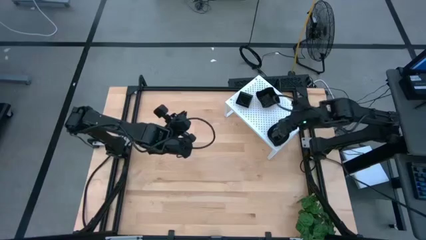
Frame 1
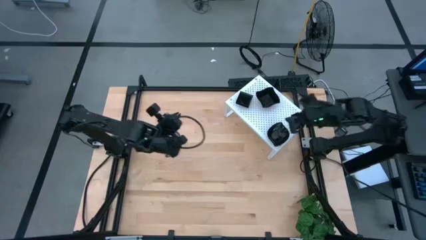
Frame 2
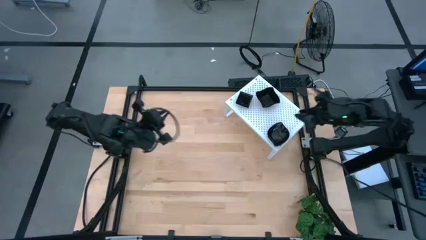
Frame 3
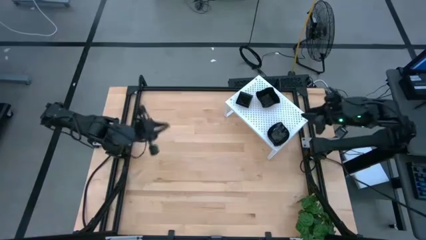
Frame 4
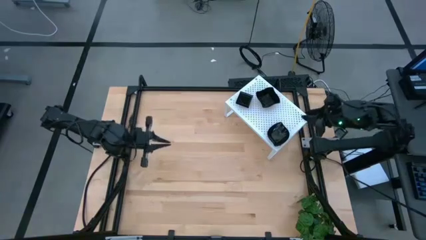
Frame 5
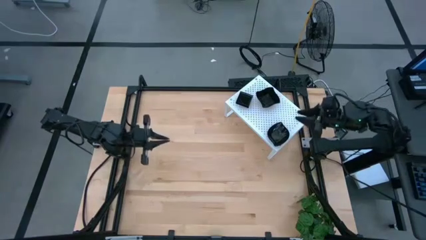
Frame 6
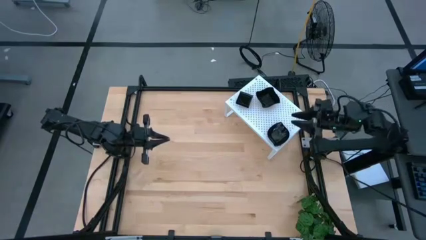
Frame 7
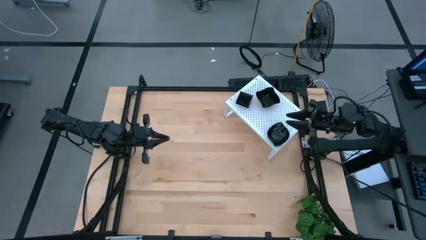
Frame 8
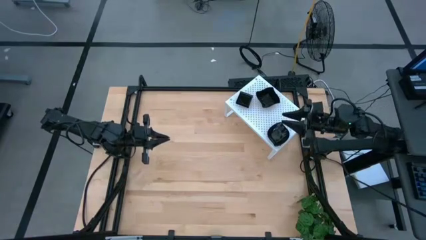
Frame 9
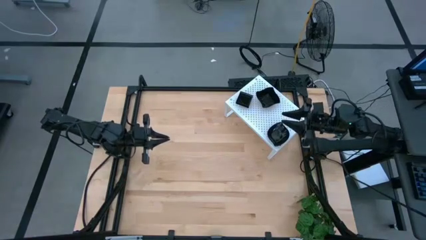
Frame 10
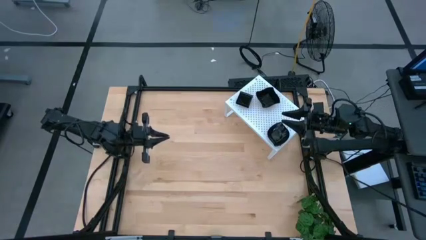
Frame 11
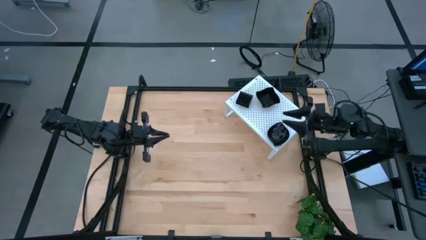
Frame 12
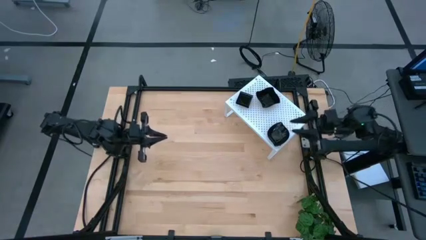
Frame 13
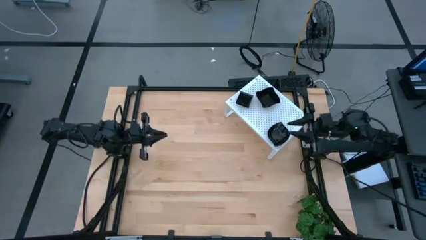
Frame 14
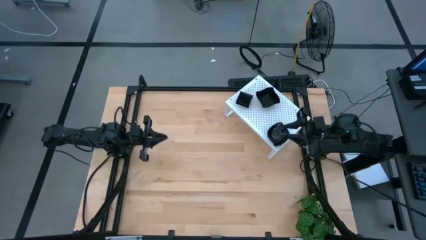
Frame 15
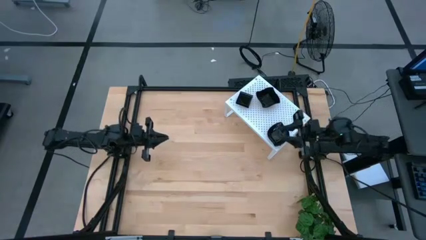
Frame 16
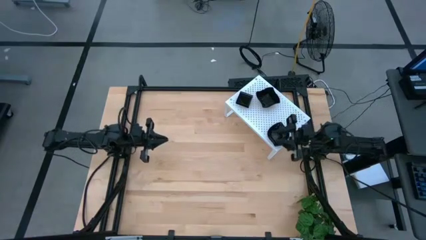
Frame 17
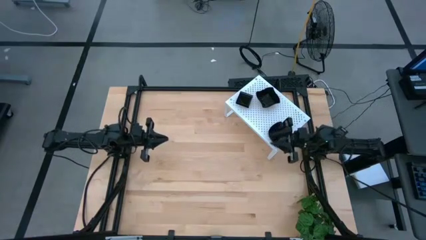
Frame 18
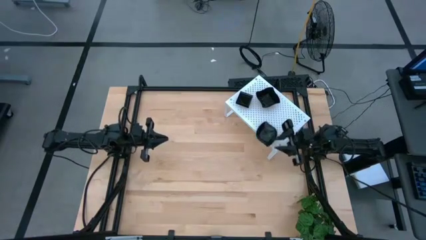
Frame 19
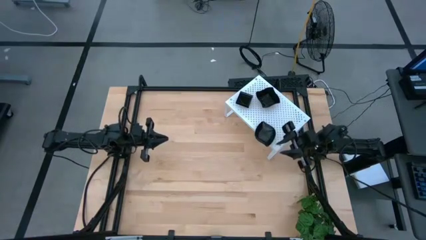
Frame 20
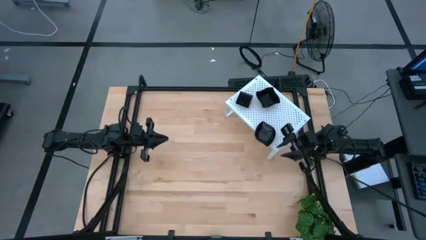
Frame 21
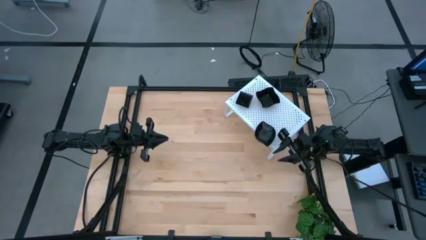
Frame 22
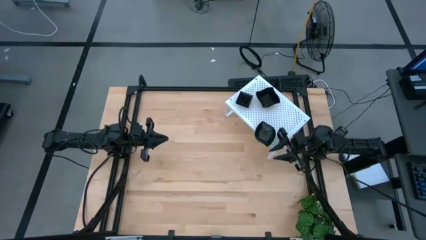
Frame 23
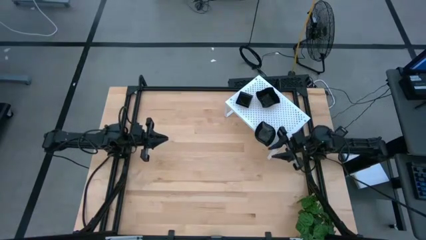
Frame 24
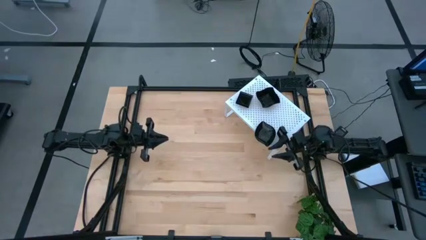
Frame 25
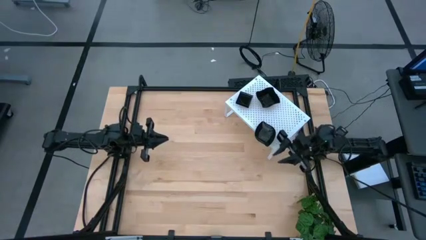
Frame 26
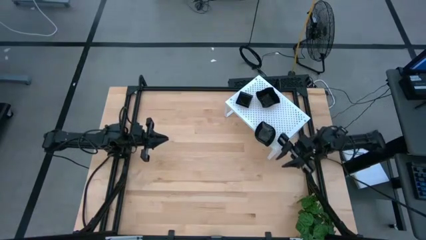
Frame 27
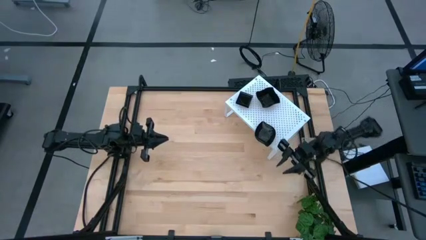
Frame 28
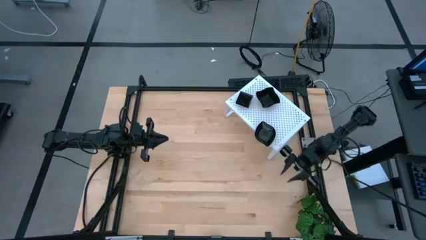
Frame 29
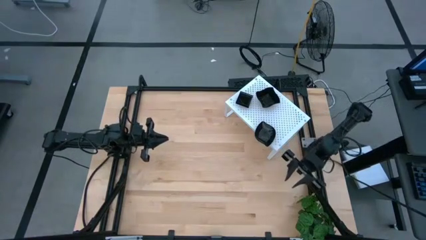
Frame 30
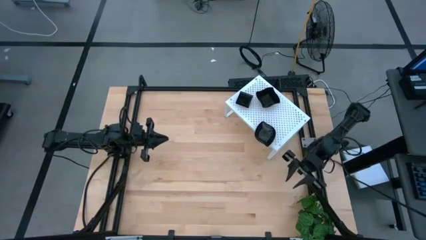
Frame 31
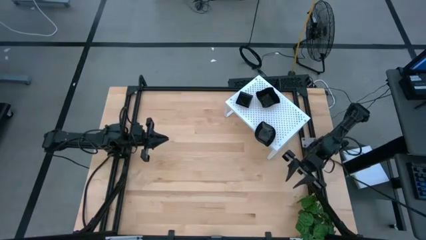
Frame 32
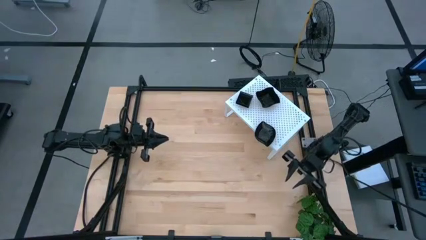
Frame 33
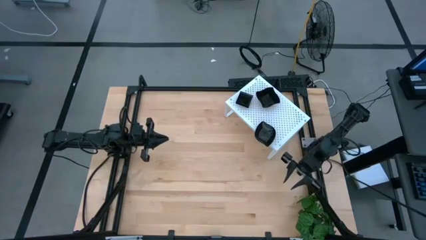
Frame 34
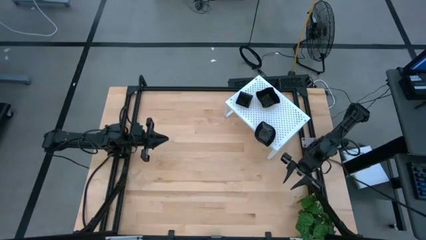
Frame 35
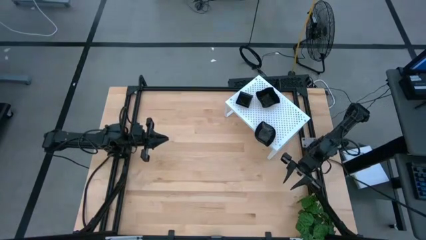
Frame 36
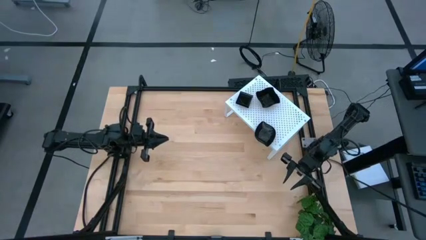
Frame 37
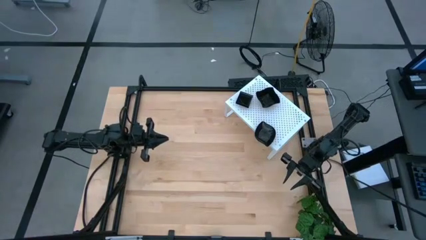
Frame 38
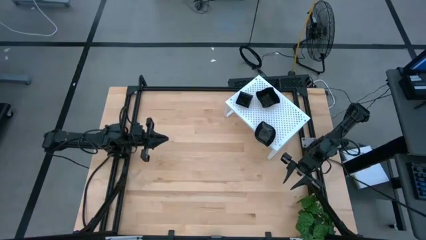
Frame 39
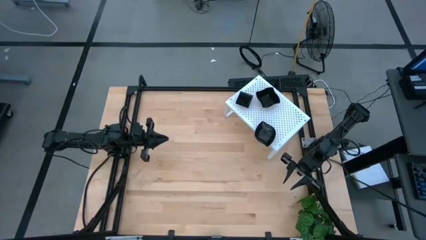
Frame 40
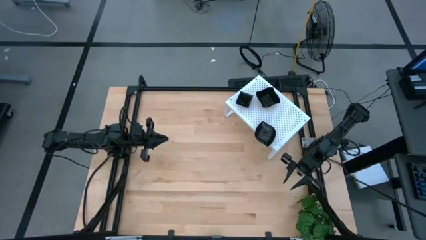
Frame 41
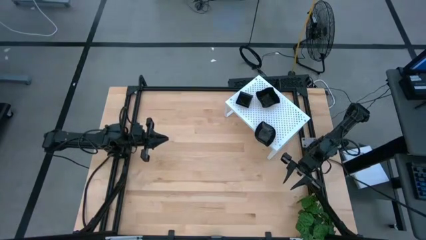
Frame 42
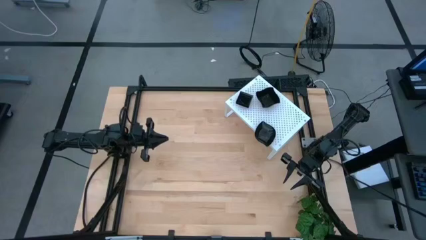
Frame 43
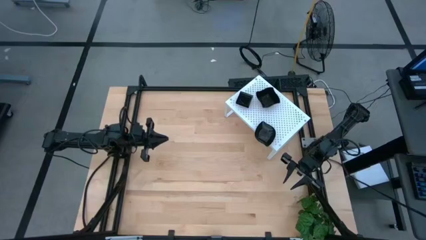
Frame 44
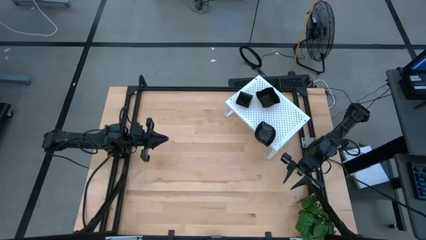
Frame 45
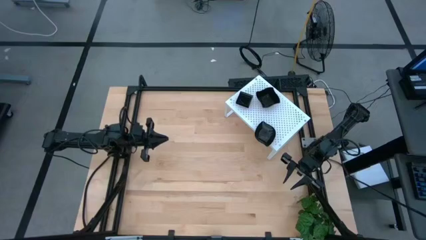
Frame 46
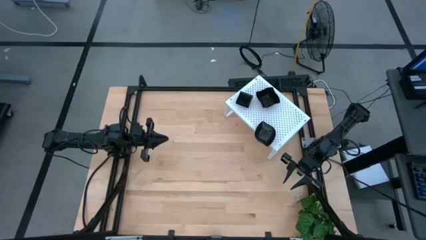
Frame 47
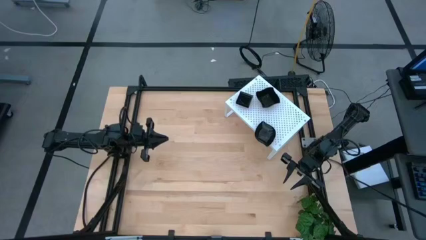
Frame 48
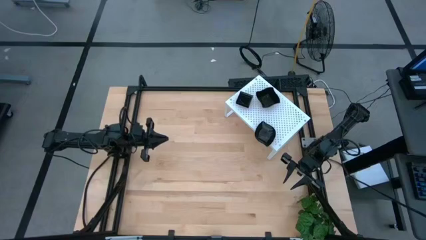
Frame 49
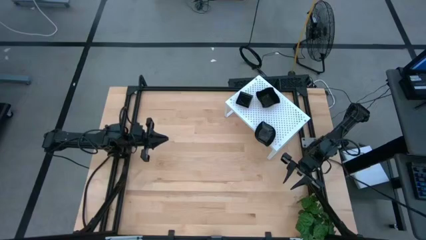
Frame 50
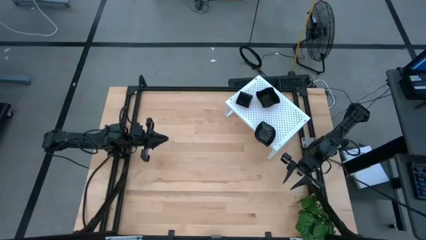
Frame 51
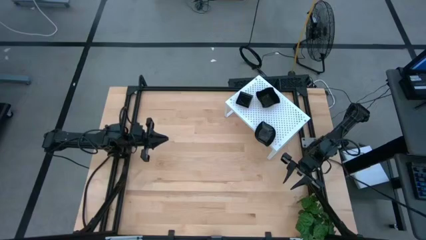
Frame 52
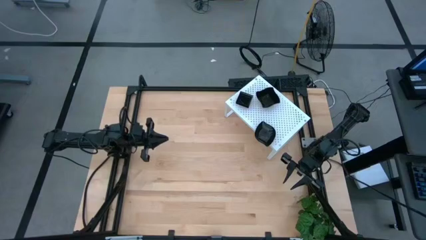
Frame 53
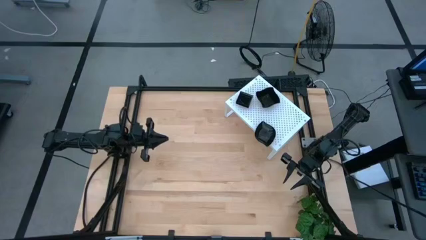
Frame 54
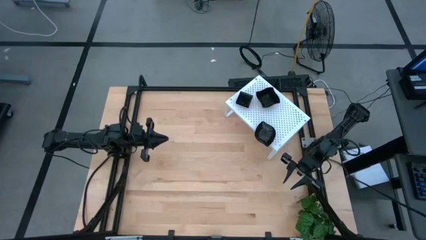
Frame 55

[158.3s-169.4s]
Task: Pick & Place Mini shaped plates
Return to Home Position

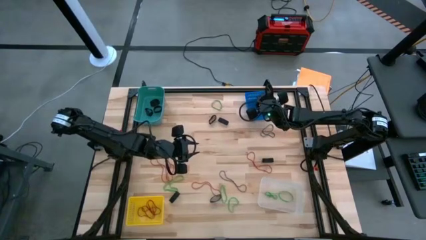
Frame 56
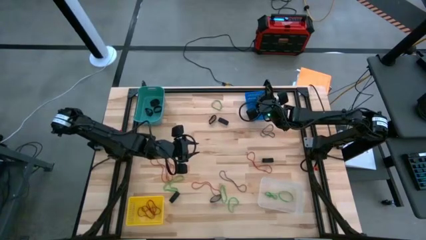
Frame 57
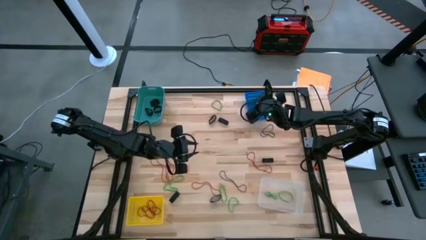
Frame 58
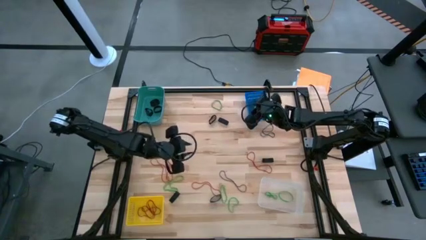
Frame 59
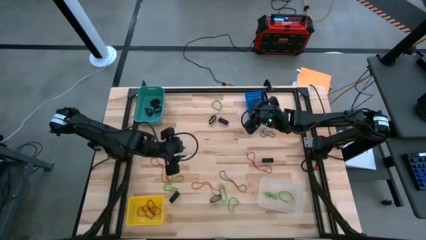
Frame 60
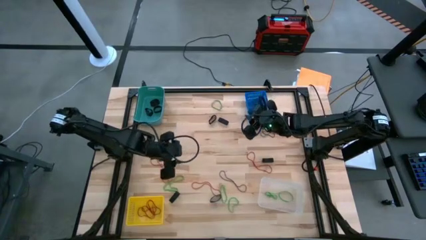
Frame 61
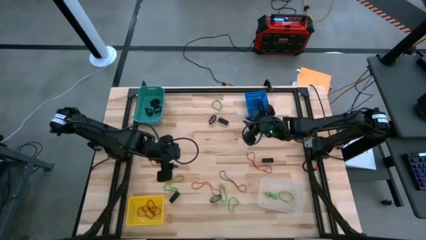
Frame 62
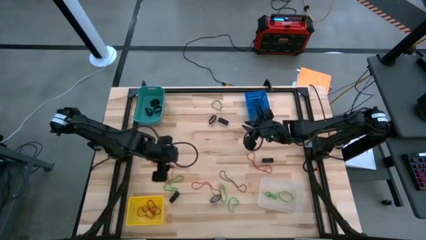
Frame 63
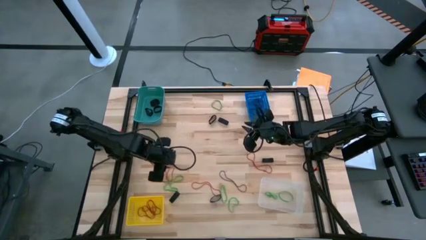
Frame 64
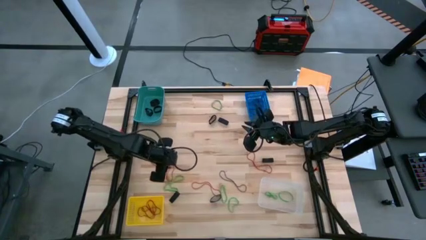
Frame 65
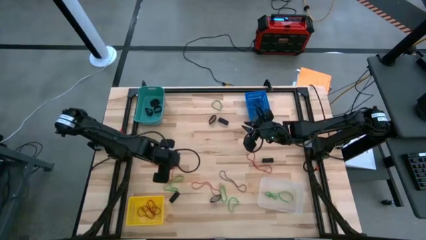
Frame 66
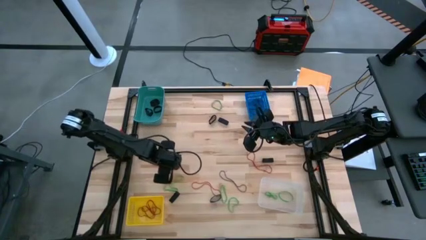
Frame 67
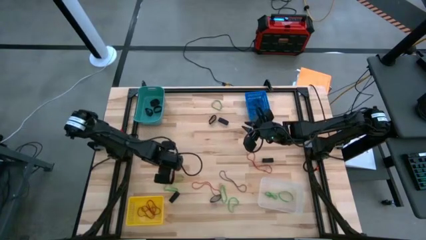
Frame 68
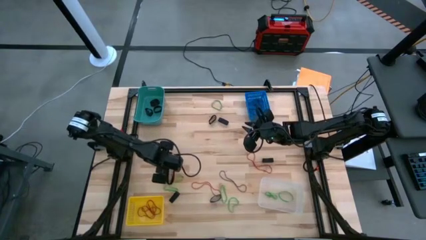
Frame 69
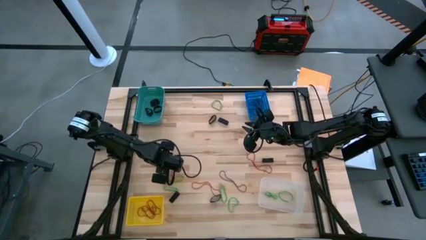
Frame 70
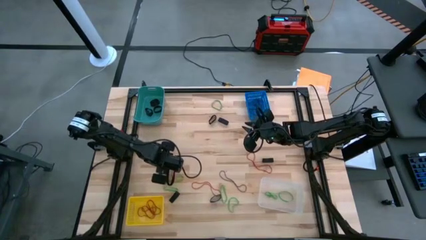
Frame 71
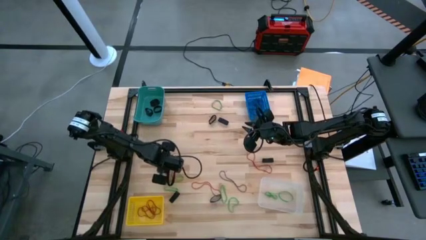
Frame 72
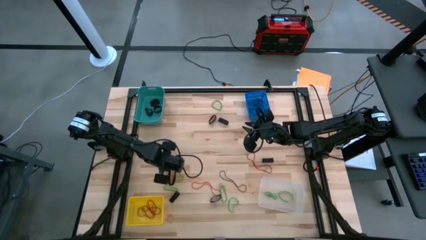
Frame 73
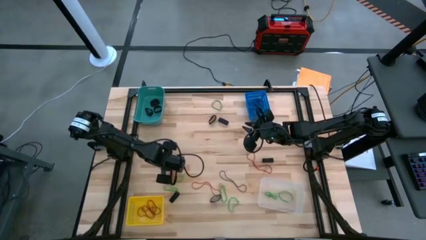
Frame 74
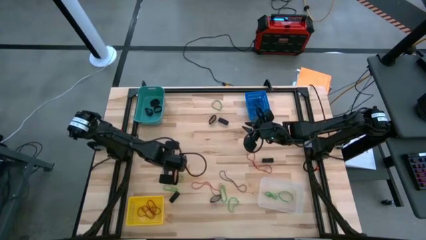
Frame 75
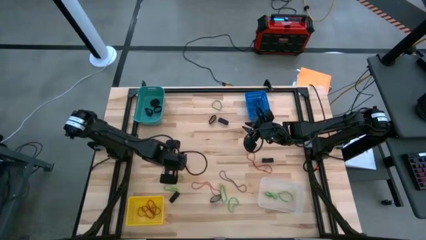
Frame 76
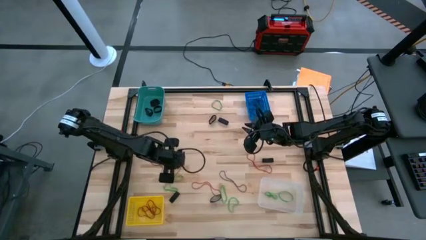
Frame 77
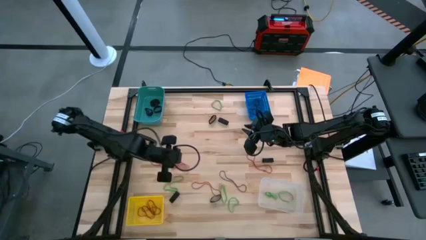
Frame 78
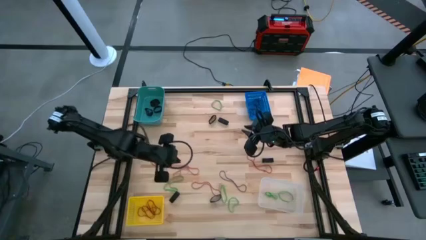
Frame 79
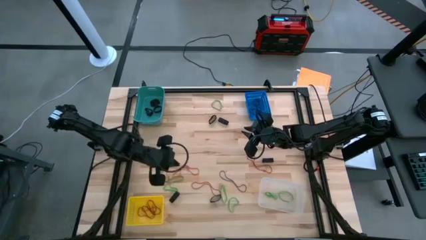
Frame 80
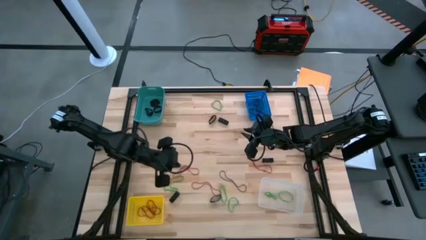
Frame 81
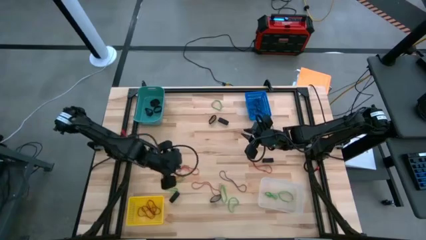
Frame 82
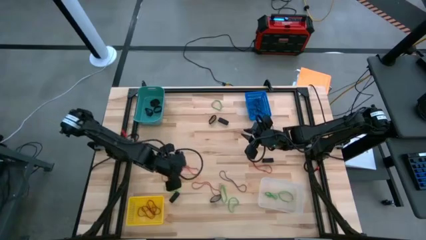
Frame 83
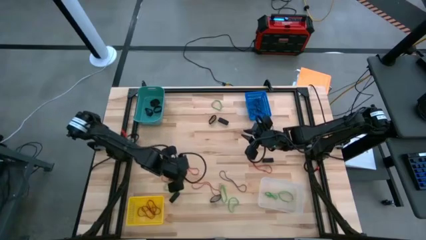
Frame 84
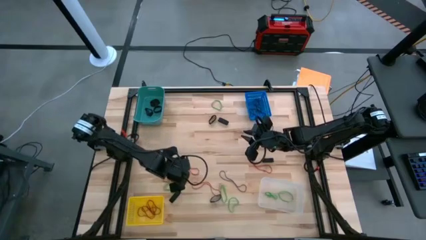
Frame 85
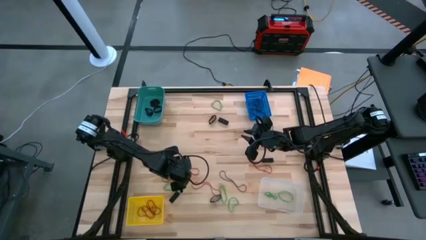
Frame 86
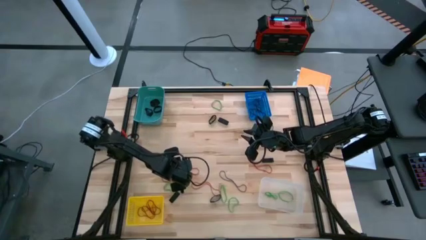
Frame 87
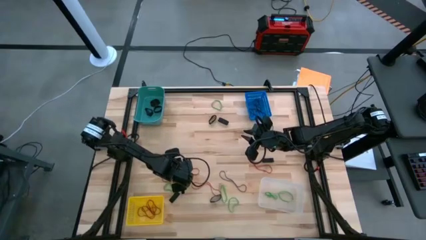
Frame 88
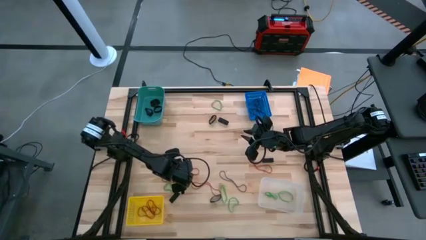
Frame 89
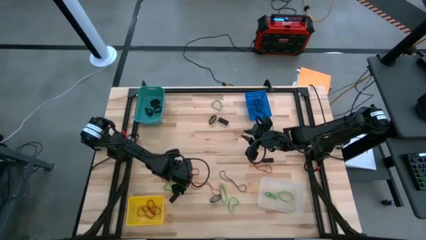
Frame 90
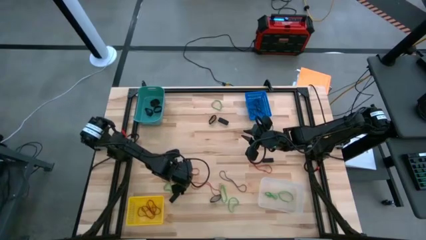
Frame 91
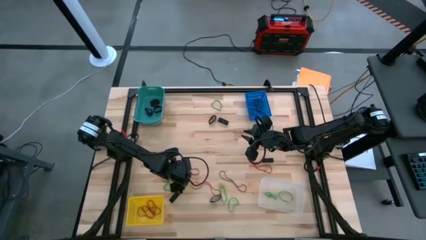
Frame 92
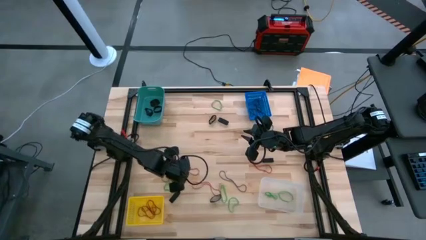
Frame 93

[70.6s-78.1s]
Task: Sort rubber bands into baskets
Put the red rubber band into the yellow basket
